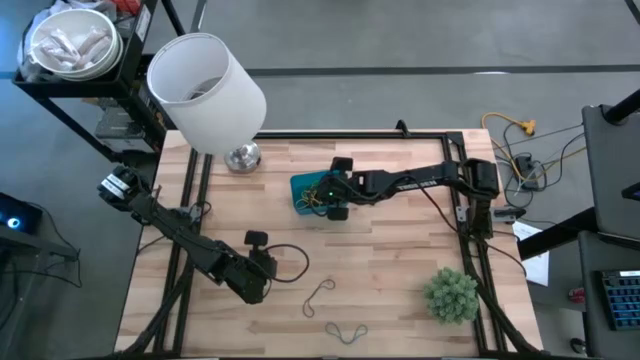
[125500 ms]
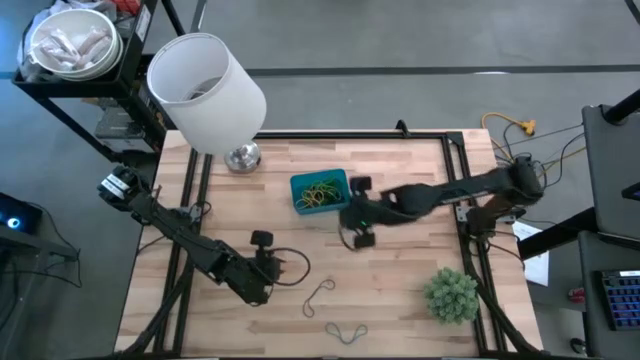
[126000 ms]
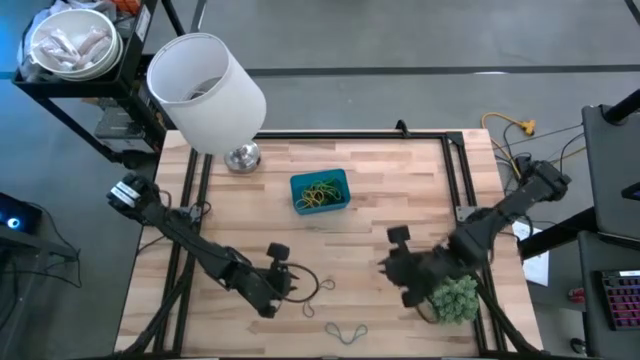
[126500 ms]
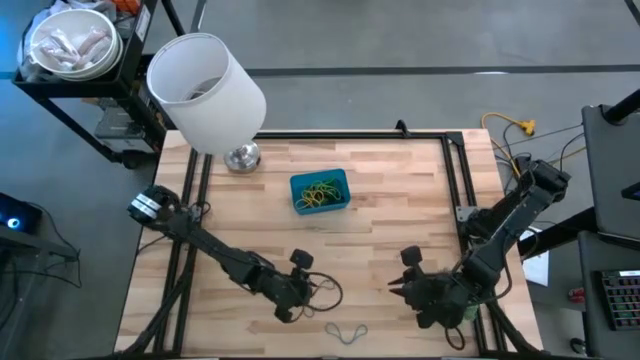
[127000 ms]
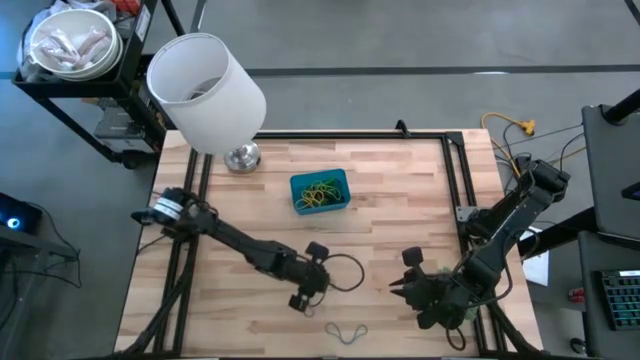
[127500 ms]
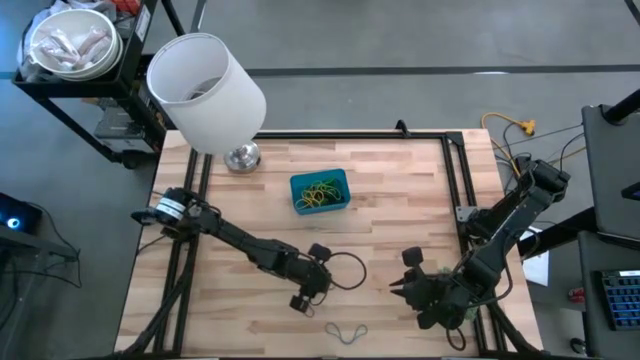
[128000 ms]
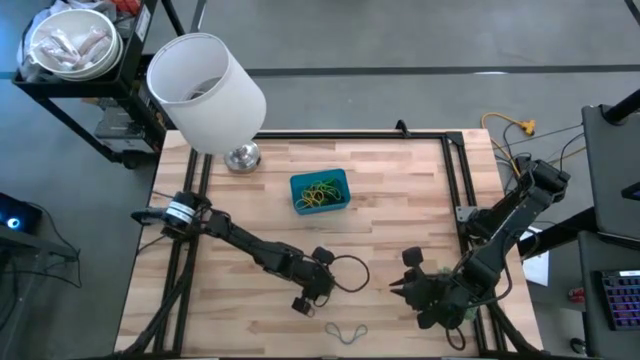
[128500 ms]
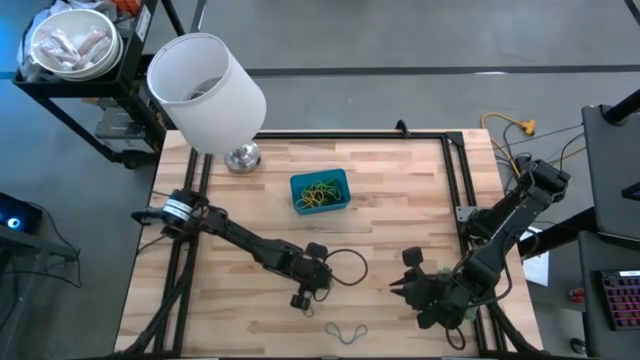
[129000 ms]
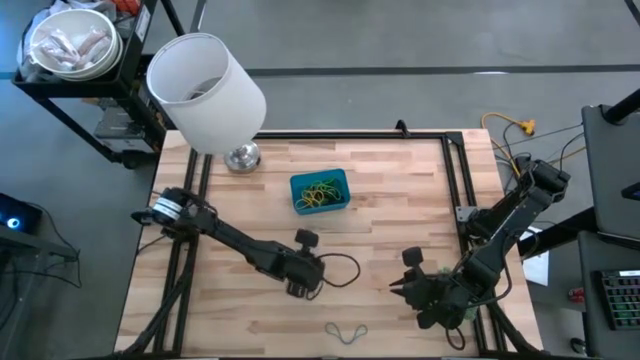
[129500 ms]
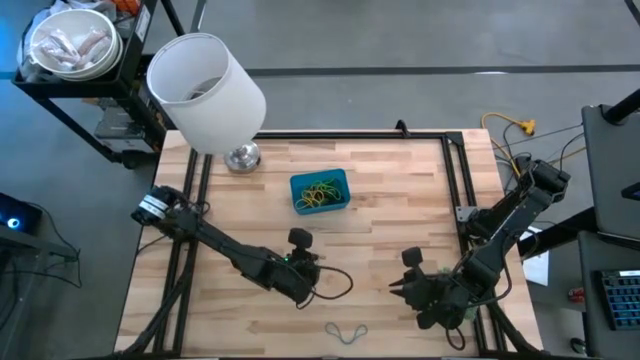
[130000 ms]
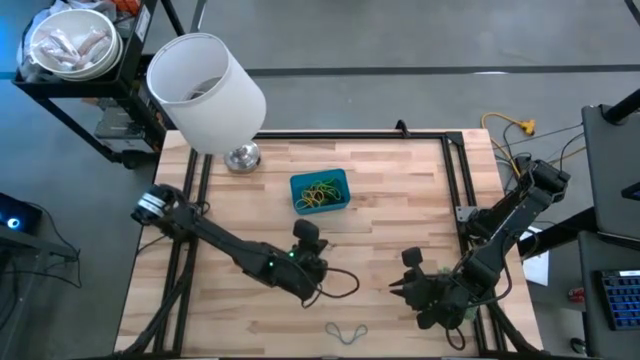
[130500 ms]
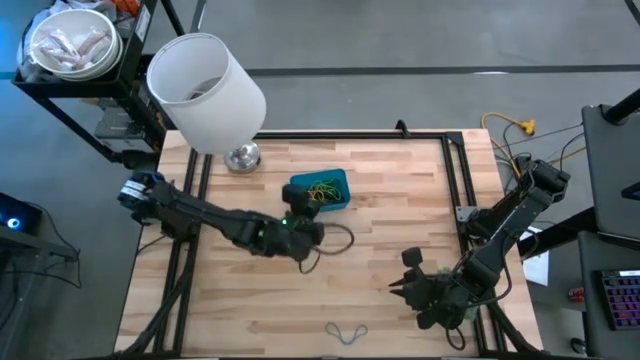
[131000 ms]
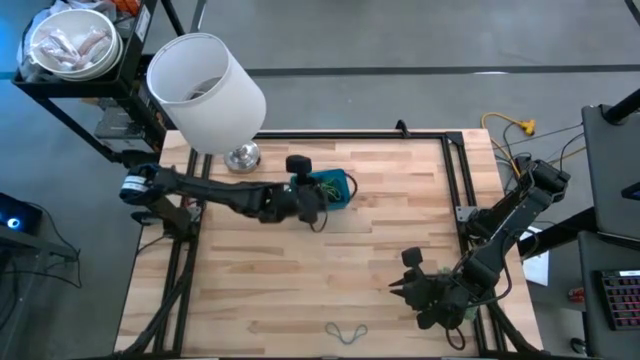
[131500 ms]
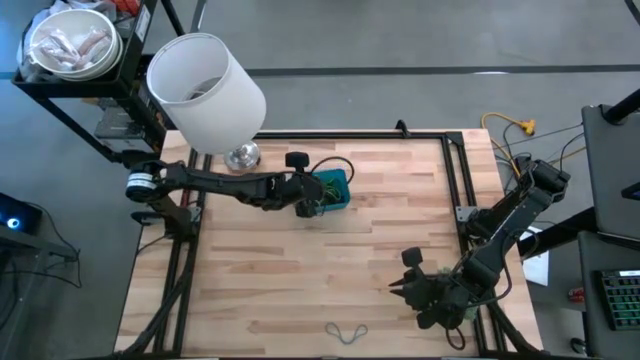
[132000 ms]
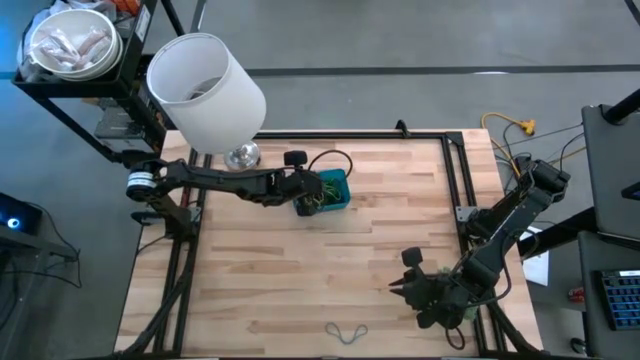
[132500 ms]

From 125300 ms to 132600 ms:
Task: Pick and place rubber bands into bin
Put the purple rubber band into the blue bin

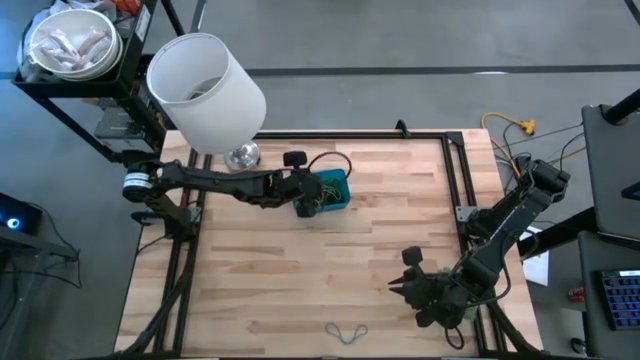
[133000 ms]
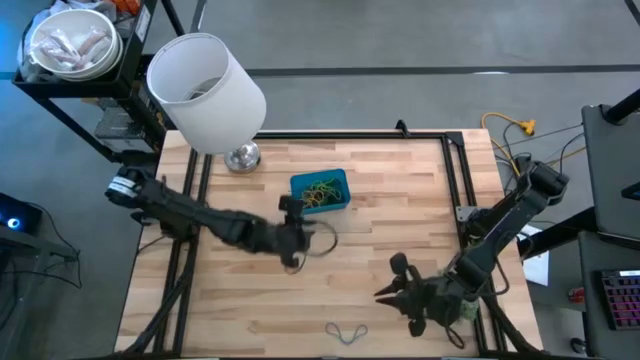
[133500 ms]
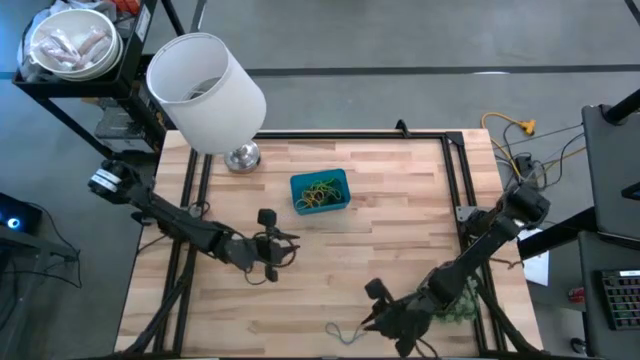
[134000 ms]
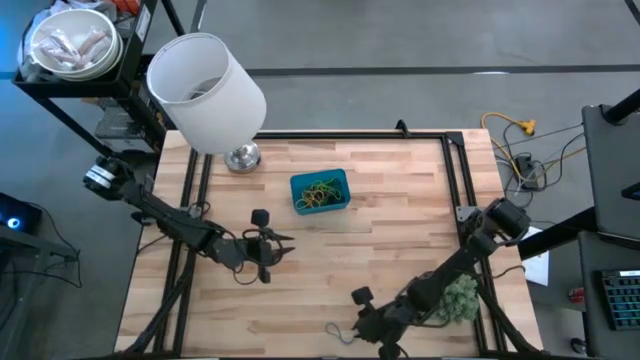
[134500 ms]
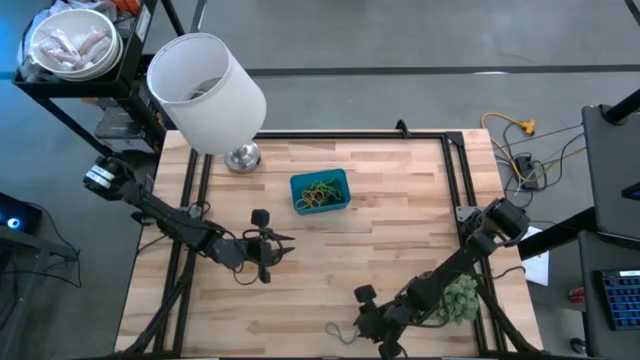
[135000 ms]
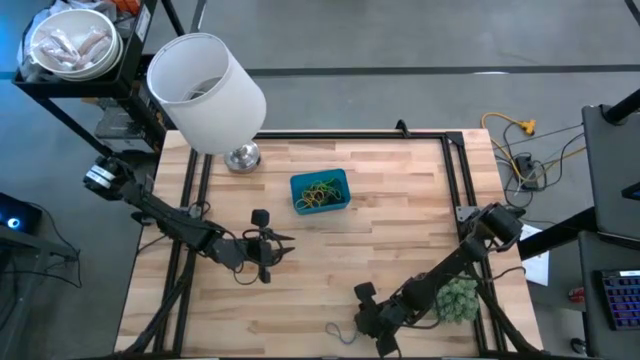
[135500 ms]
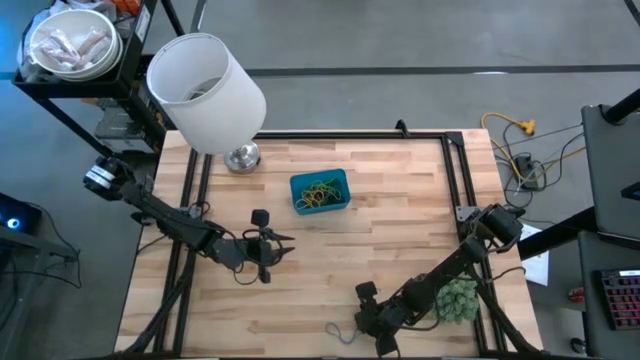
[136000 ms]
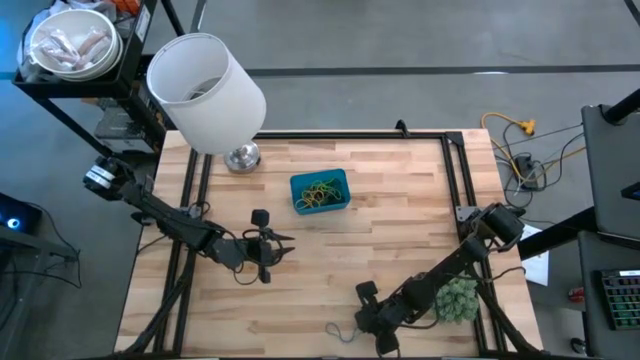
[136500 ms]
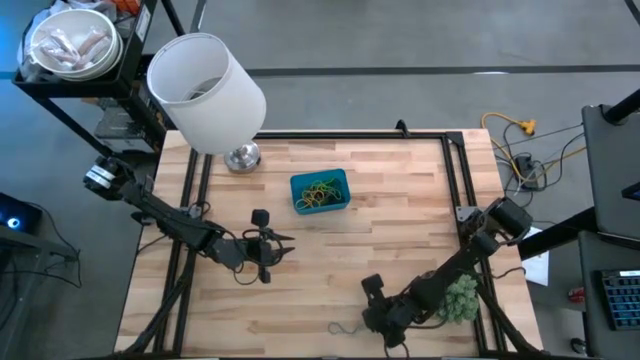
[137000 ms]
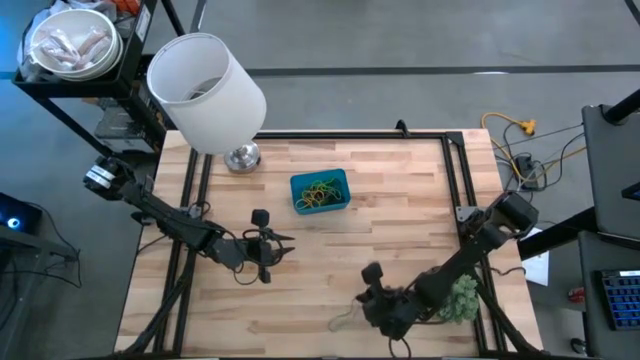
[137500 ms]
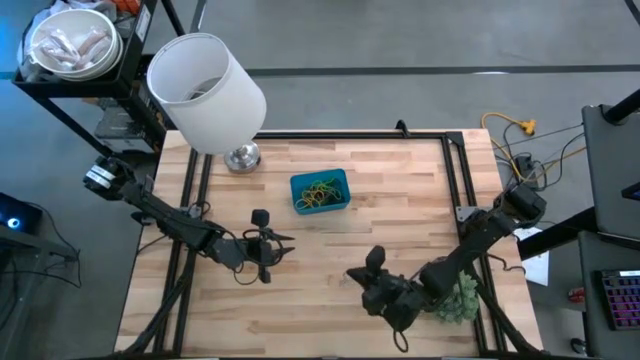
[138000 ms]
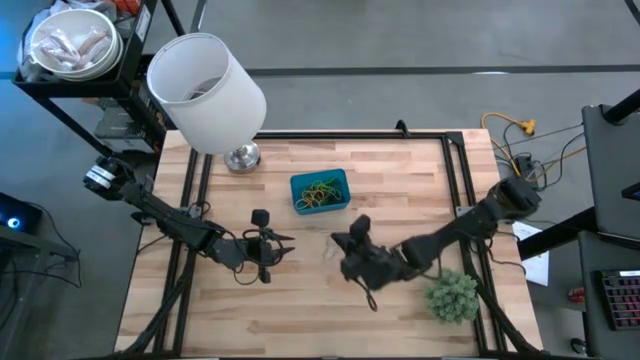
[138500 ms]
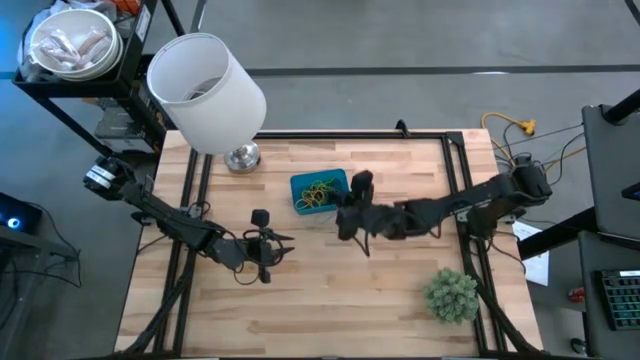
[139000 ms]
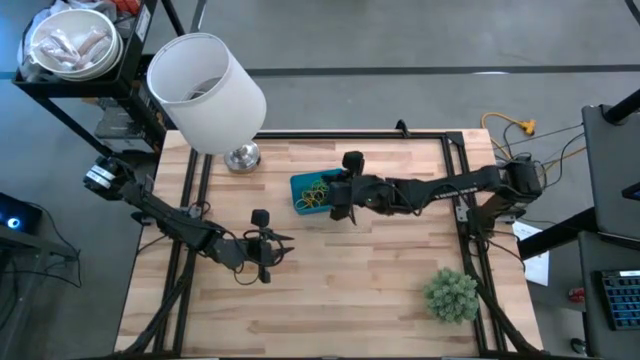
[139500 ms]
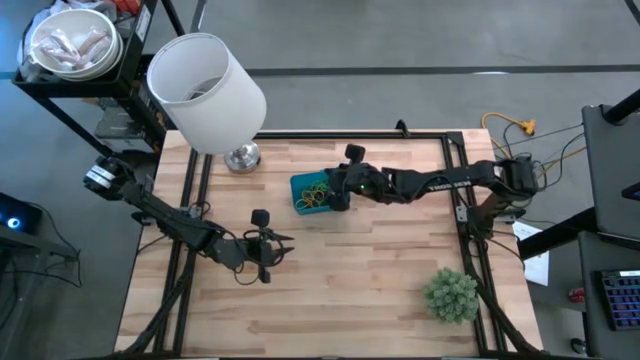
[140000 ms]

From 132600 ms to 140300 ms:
Put the blue rubber band into the blue bin

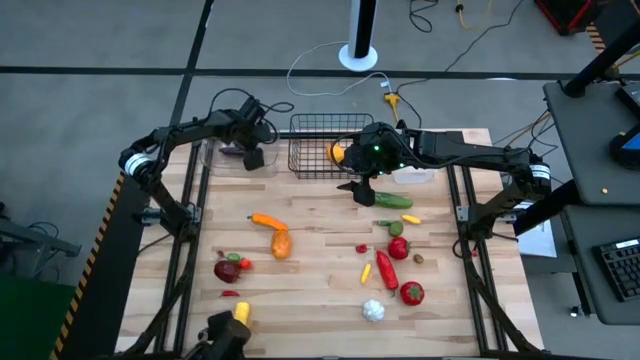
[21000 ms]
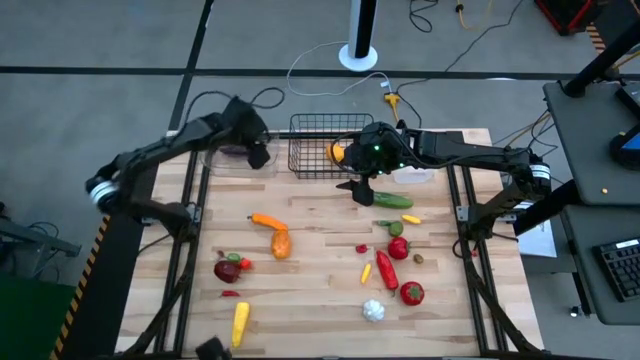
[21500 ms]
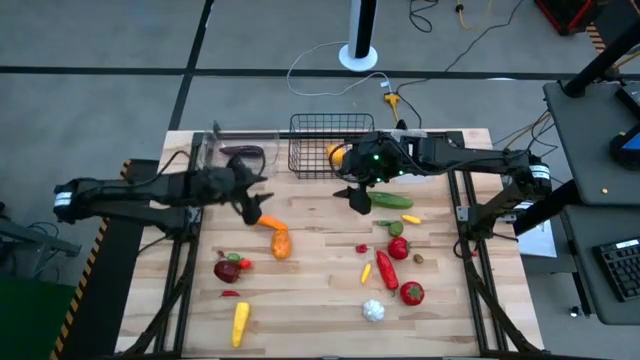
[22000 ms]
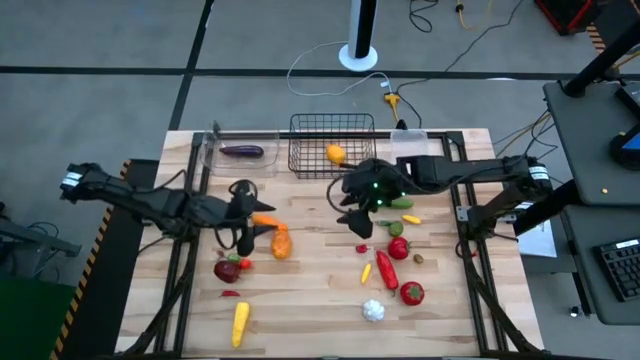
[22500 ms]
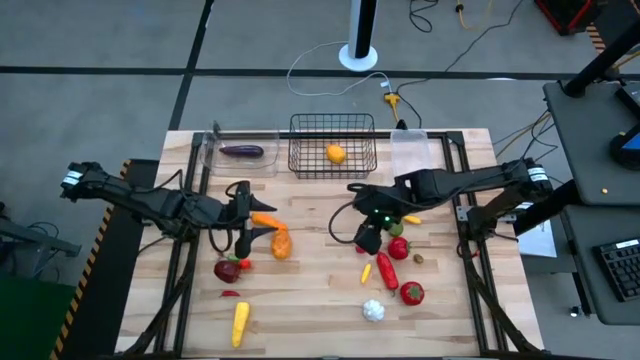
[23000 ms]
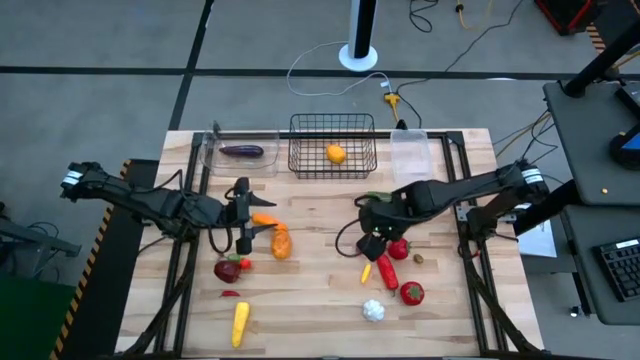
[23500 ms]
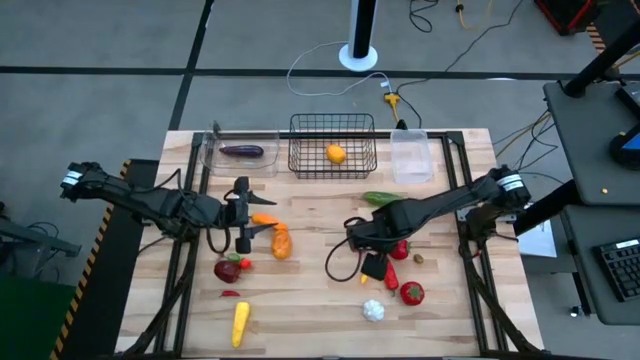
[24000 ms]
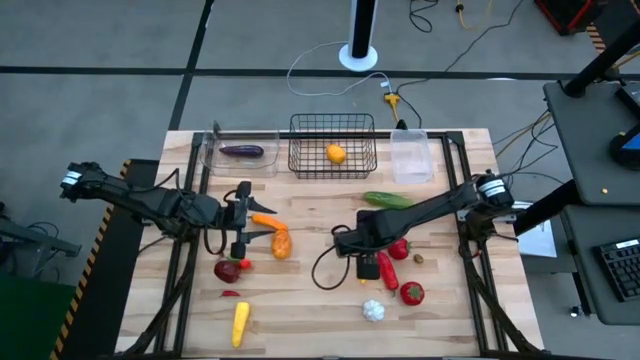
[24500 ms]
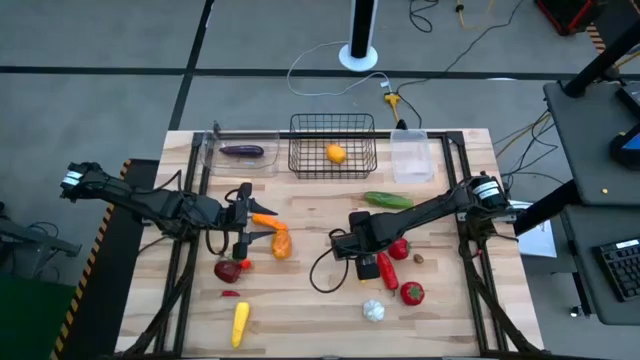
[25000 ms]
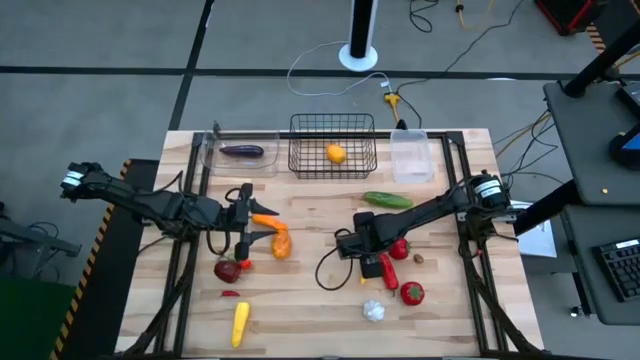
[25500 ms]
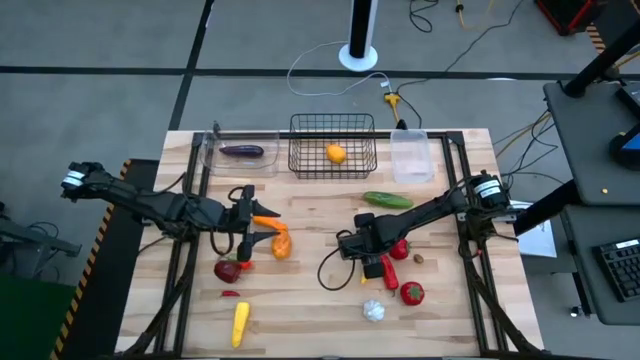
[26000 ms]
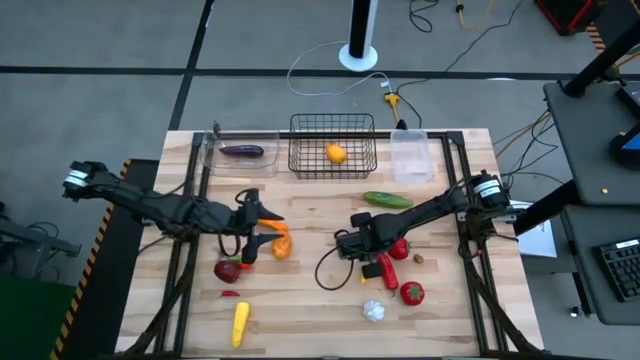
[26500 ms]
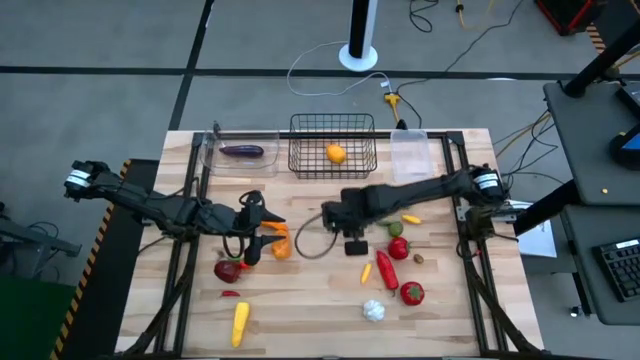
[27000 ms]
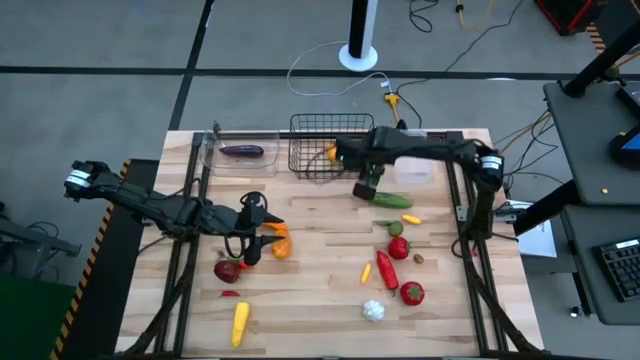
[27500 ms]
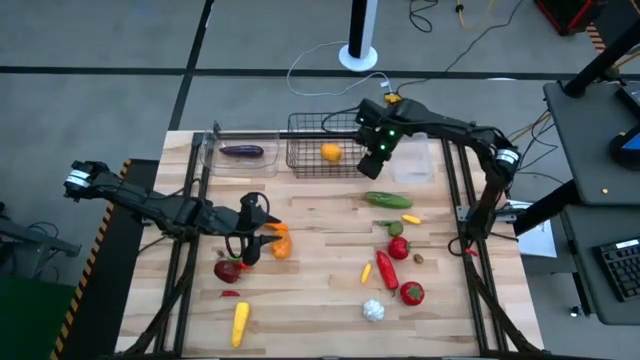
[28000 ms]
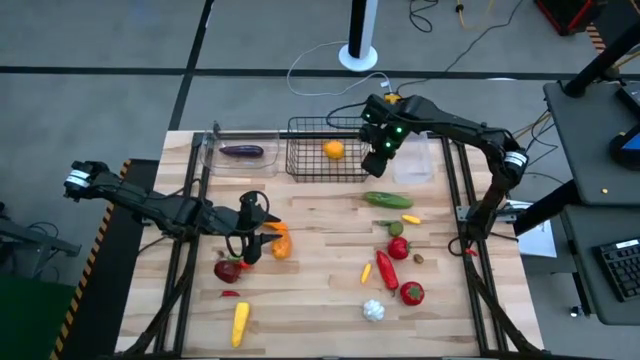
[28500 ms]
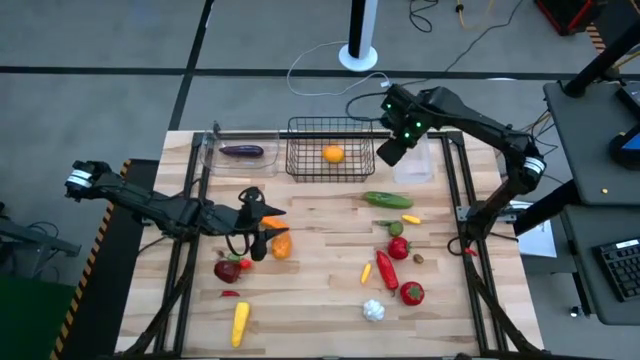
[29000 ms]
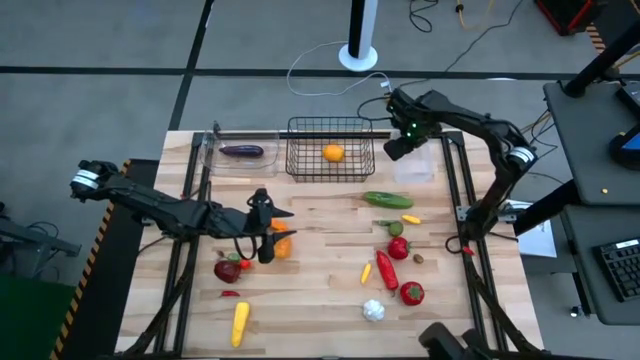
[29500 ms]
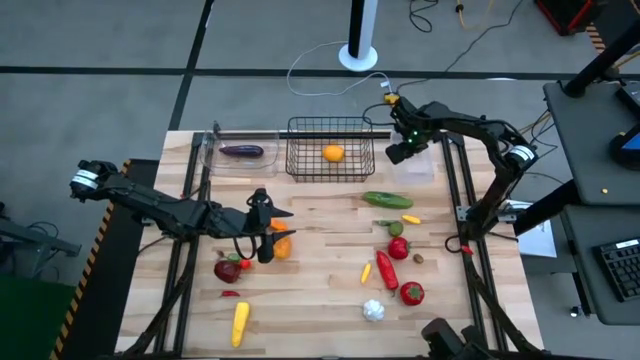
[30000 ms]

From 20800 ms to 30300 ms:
Task: Sort produce into baskets
Put the cherry pepper into the white bin
